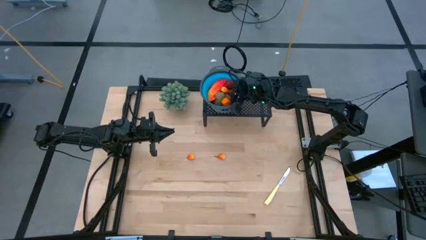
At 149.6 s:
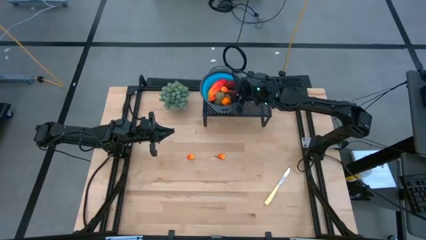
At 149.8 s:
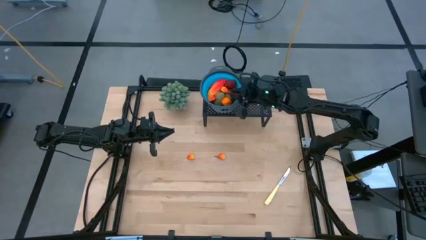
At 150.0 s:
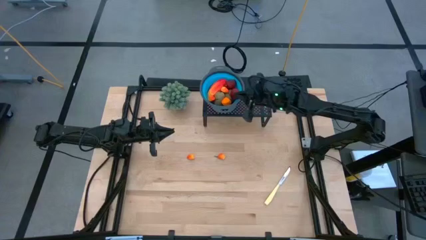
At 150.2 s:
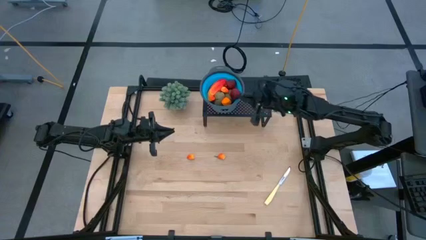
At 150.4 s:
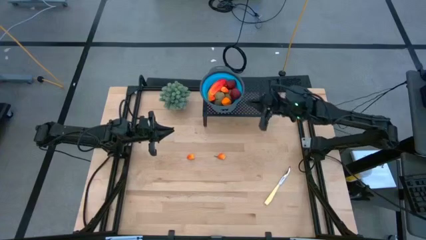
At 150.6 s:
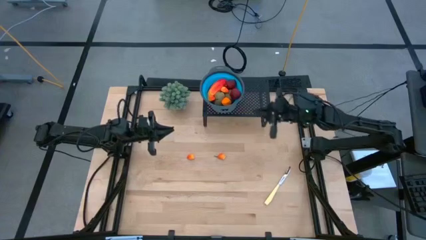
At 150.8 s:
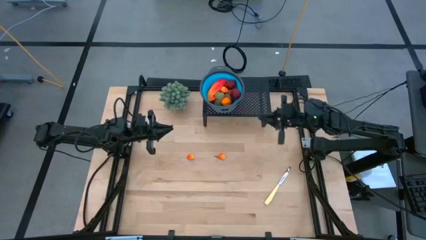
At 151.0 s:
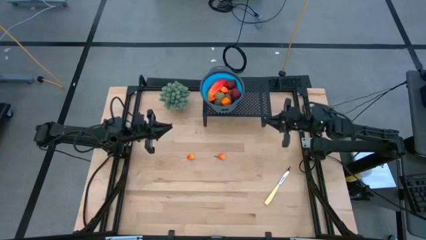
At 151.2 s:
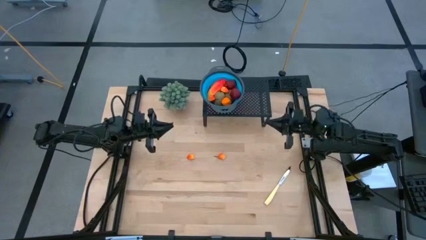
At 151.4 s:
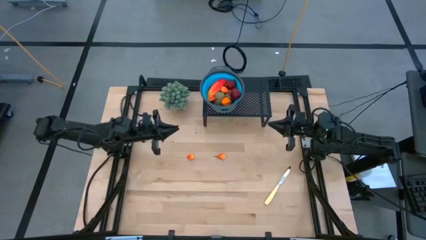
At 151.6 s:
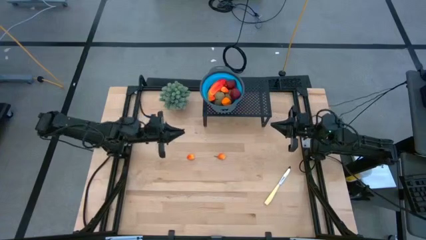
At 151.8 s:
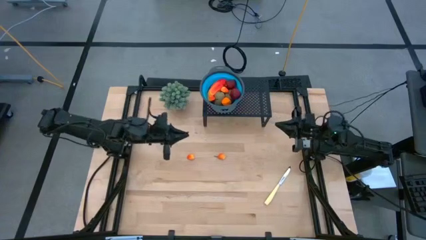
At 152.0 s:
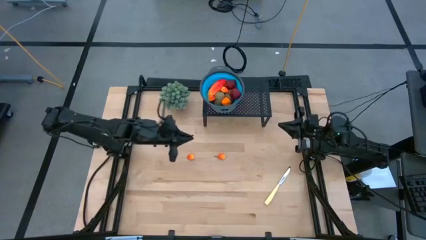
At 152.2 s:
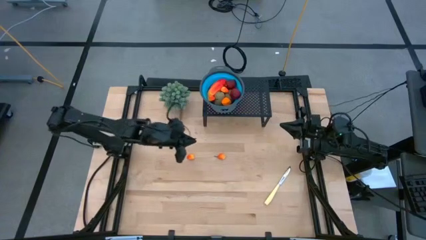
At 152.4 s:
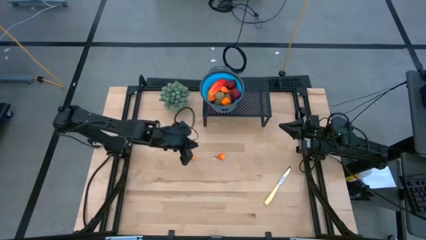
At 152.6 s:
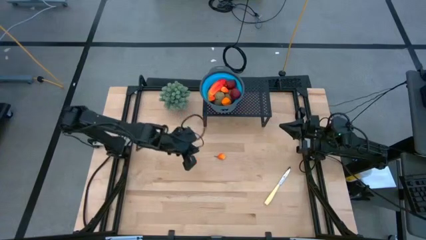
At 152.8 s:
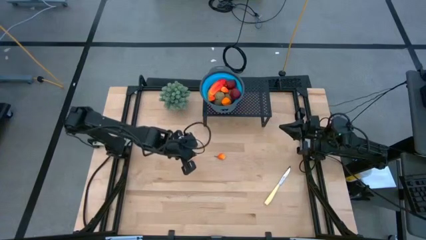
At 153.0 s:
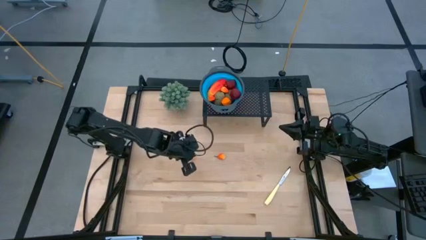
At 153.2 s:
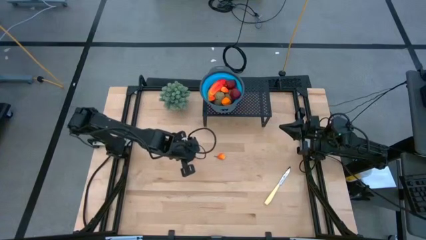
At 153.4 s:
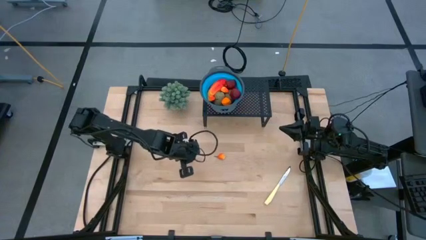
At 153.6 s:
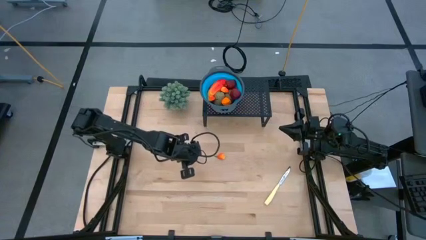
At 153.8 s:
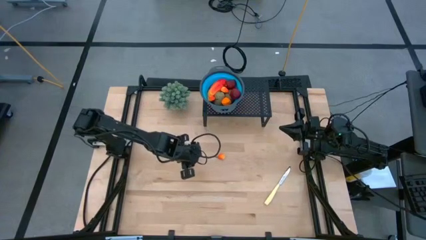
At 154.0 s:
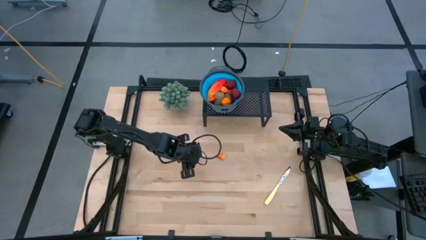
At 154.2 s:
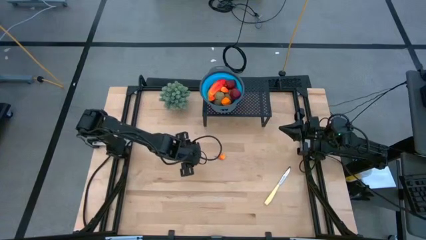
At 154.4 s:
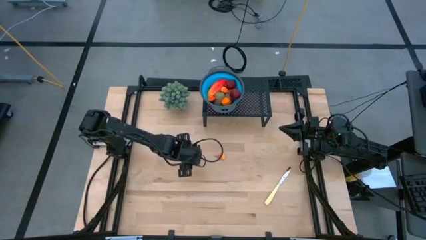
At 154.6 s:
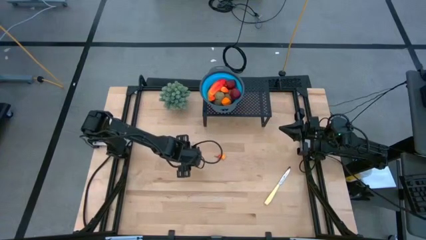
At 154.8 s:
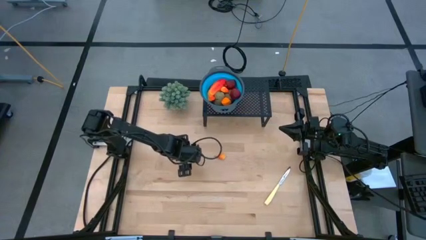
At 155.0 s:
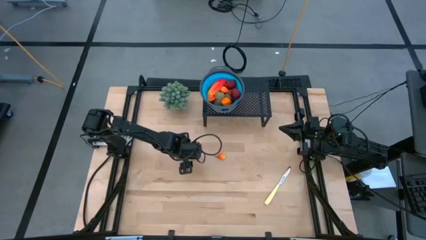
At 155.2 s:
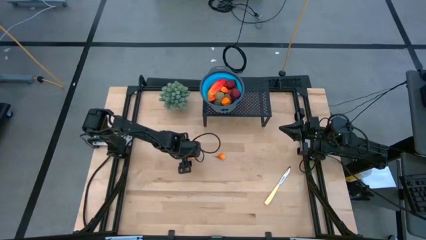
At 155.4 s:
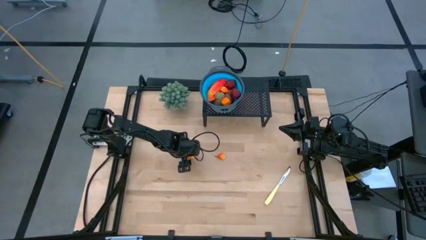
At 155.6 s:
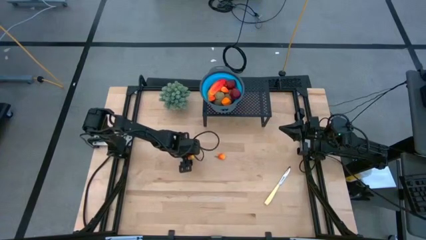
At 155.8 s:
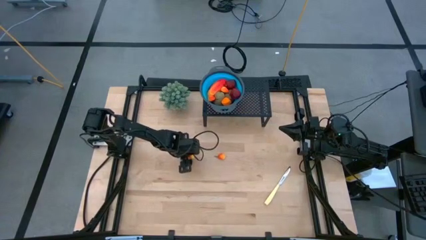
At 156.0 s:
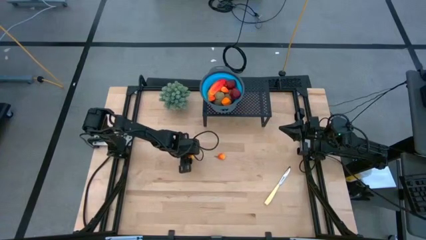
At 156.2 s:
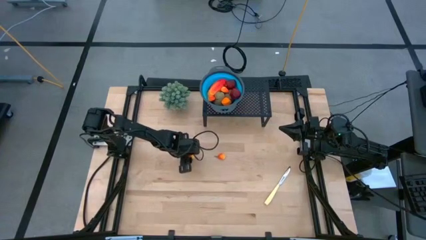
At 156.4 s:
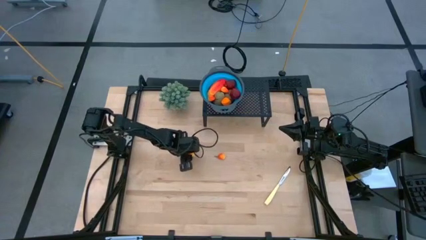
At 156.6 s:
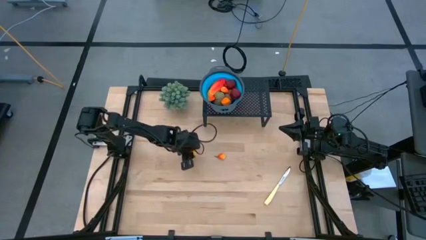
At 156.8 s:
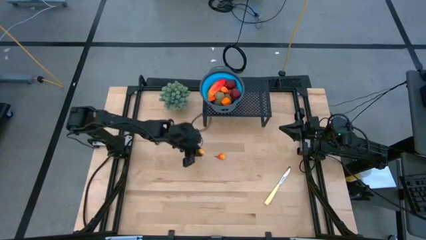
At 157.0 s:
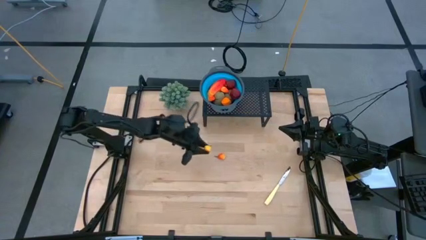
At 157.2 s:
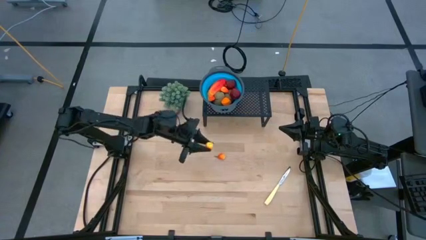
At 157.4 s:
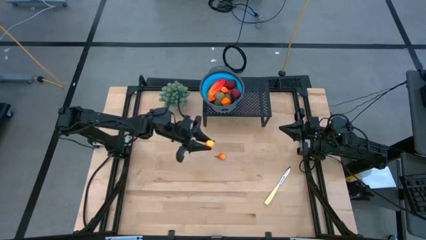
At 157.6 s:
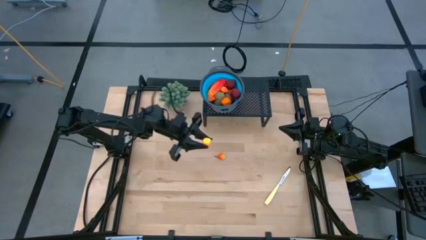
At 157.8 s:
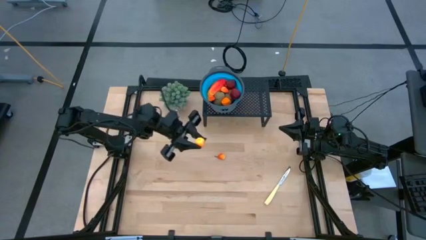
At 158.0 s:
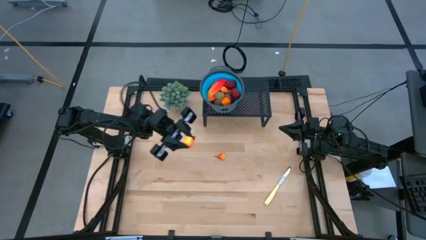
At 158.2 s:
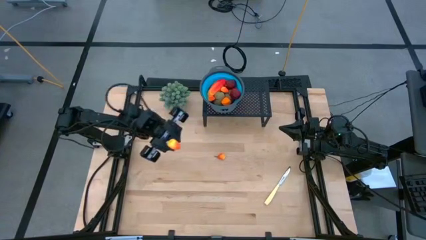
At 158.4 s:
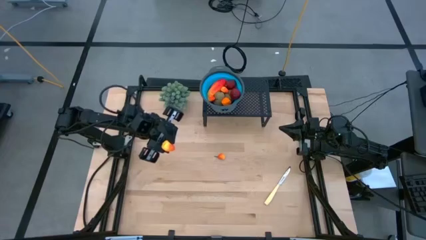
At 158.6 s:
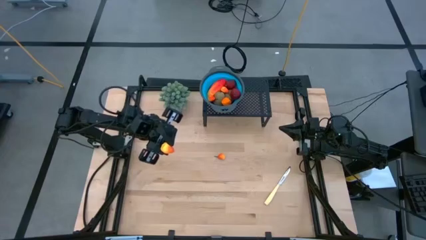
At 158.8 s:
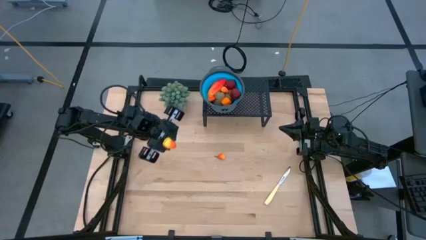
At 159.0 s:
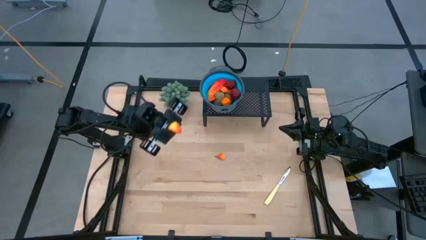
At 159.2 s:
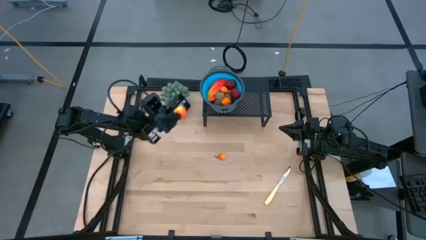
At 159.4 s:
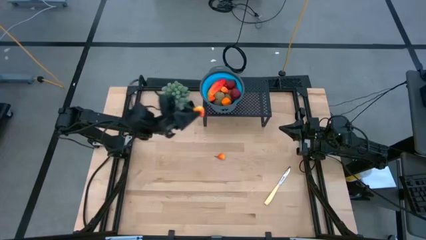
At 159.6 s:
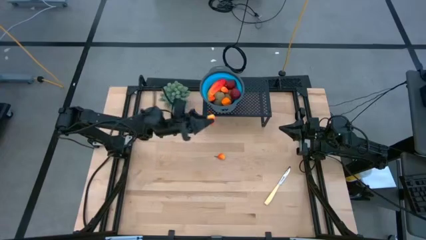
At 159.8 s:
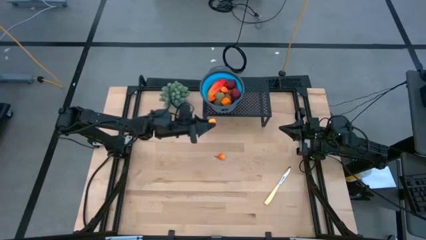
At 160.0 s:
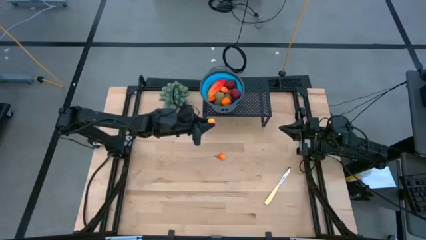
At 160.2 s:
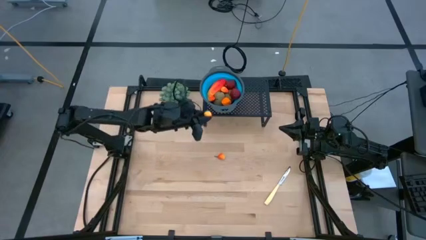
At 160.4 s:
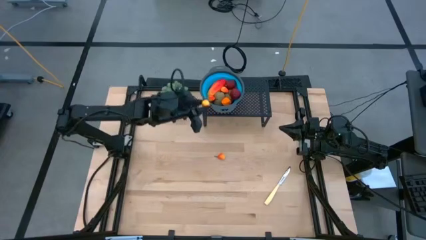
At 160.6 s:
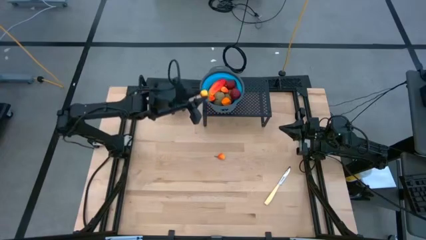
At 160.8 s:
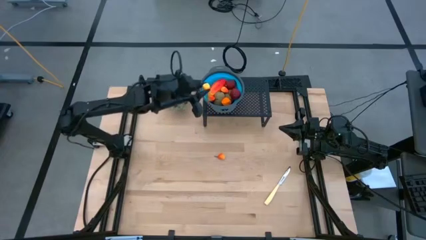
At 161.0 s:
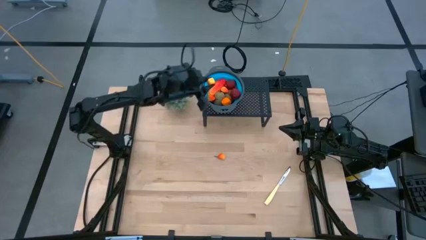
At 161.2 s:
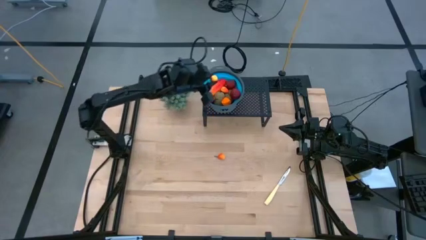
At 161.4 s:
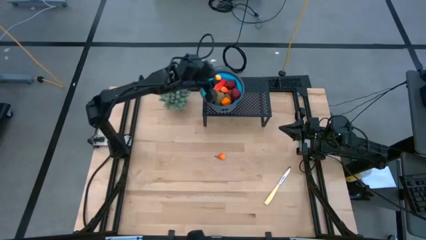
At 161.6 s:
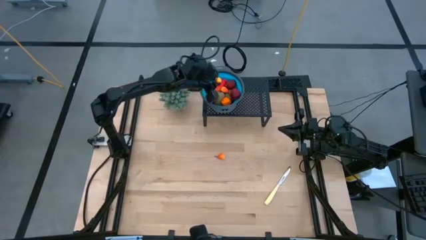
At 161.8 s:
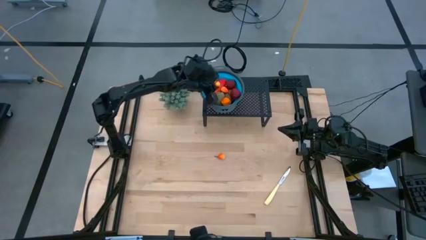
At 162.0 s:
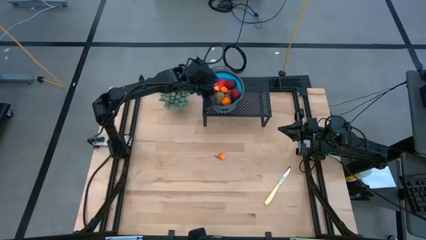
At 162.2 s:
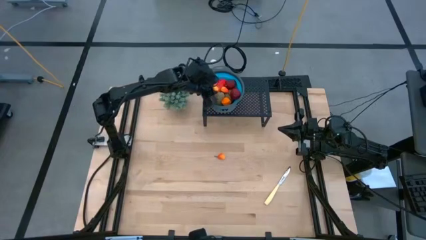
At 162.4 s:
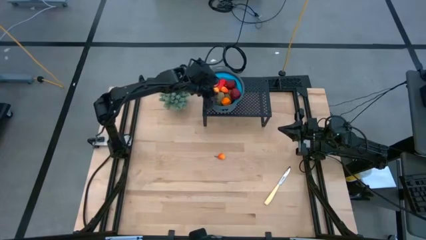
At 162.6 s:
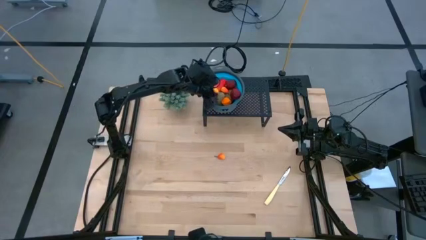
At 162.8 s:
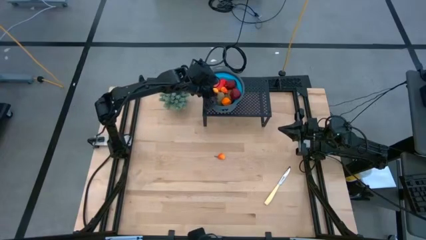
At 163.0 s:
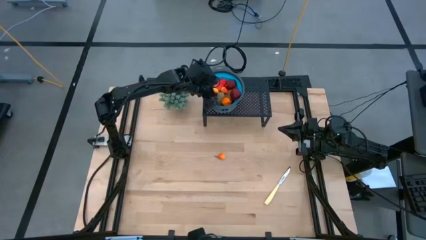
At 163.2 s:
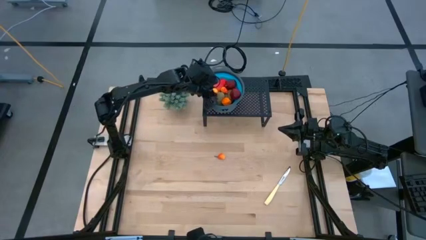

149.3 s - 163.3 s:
Task: Pick & Place Fruit
Put the orange peach into the blue strainer bowl on the shelf
